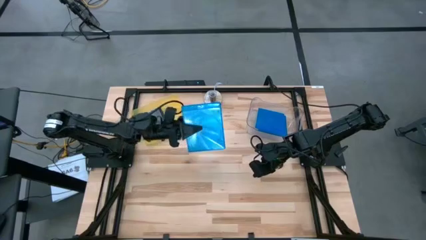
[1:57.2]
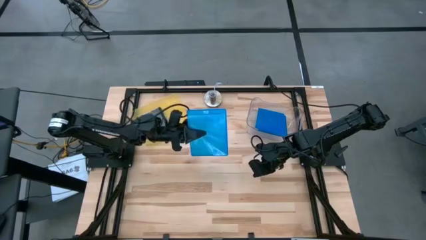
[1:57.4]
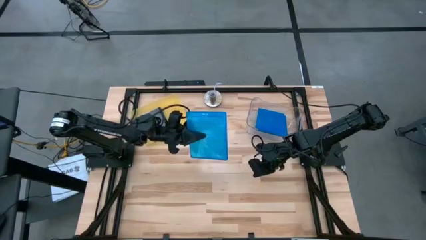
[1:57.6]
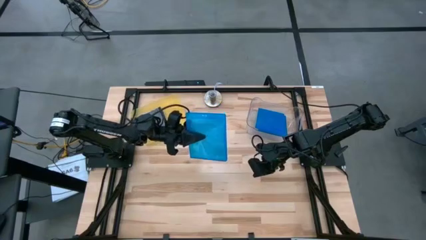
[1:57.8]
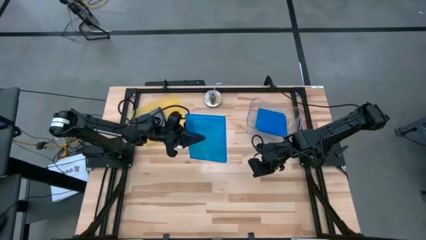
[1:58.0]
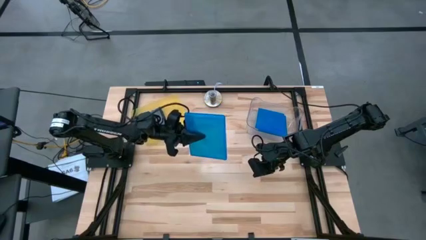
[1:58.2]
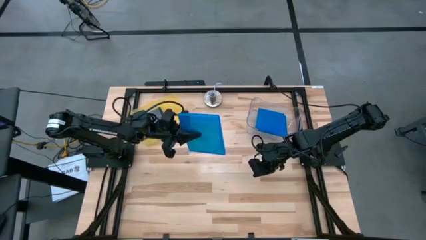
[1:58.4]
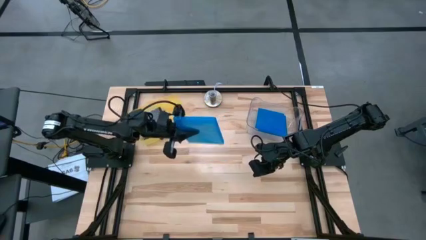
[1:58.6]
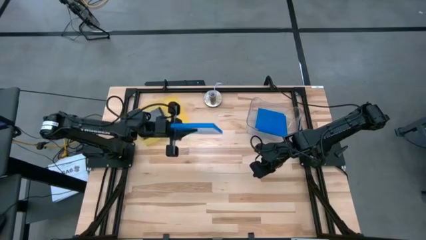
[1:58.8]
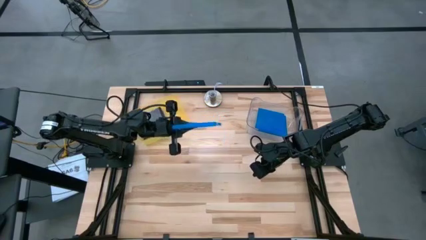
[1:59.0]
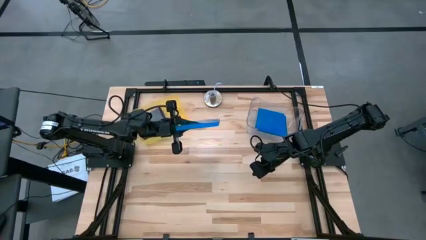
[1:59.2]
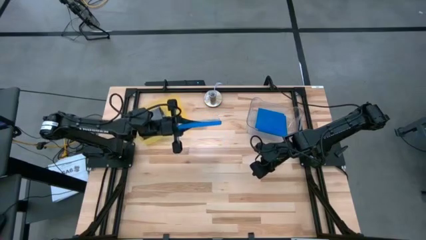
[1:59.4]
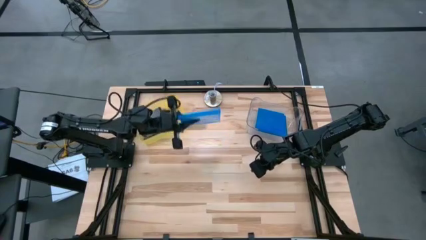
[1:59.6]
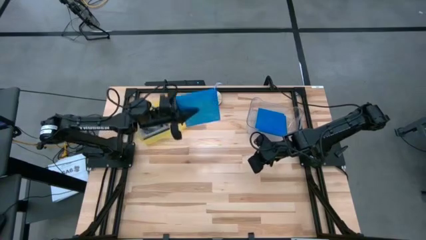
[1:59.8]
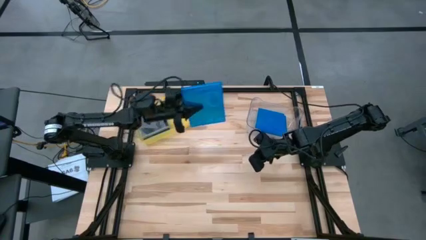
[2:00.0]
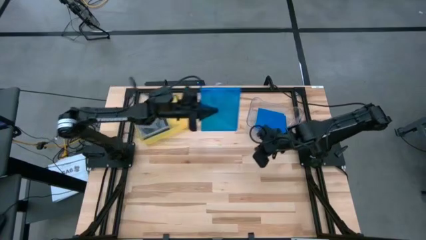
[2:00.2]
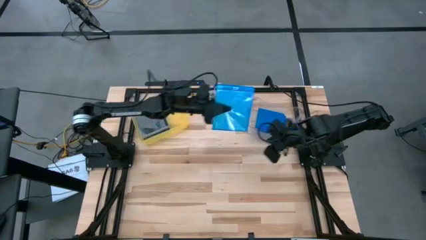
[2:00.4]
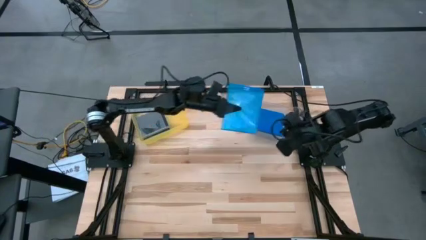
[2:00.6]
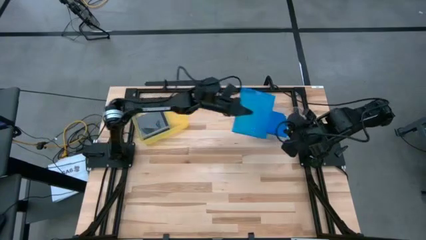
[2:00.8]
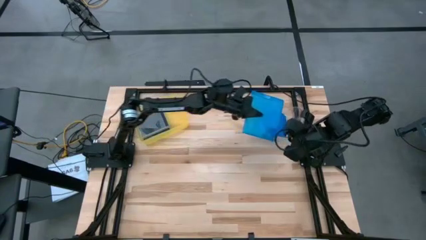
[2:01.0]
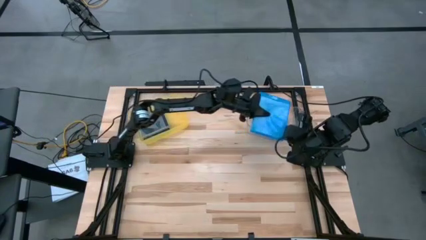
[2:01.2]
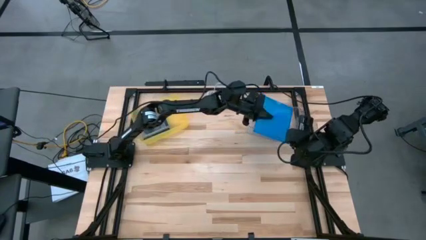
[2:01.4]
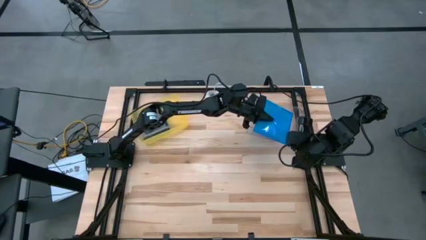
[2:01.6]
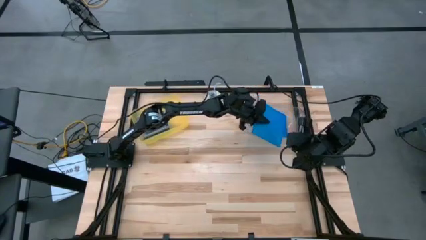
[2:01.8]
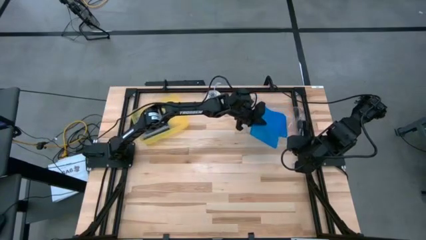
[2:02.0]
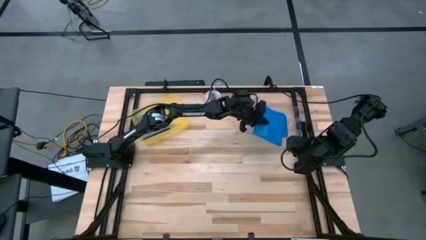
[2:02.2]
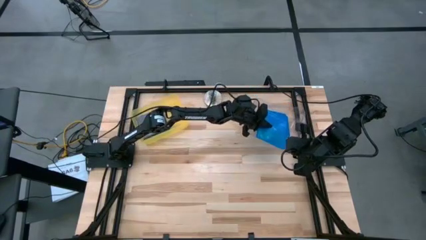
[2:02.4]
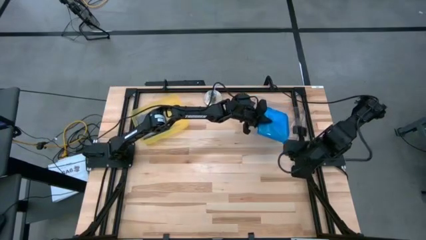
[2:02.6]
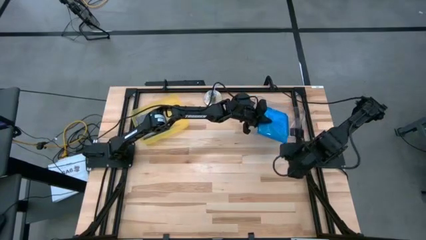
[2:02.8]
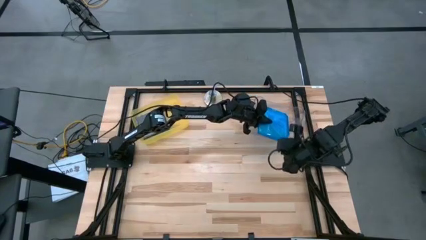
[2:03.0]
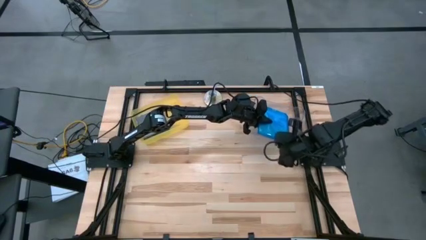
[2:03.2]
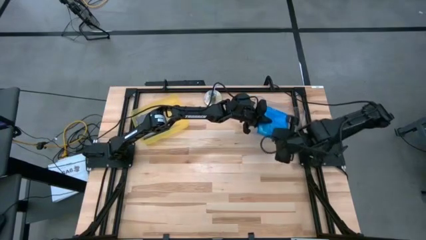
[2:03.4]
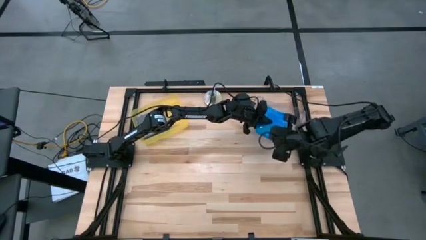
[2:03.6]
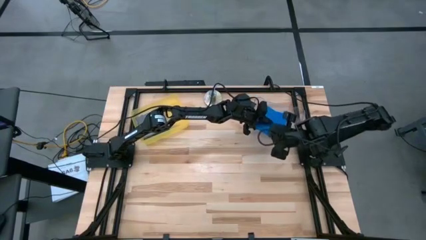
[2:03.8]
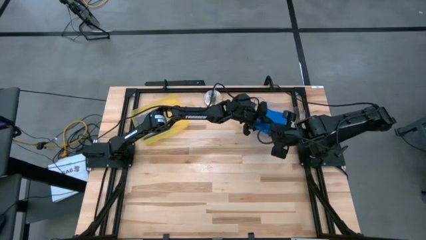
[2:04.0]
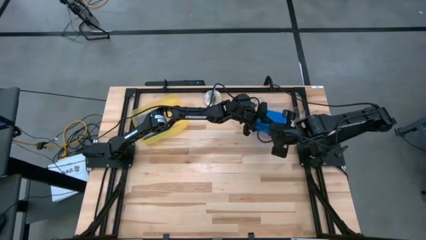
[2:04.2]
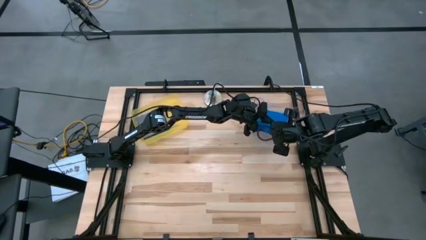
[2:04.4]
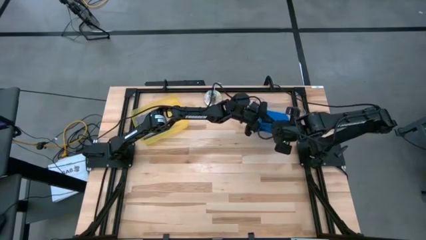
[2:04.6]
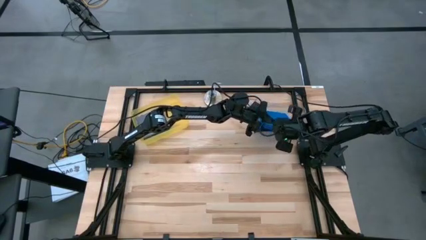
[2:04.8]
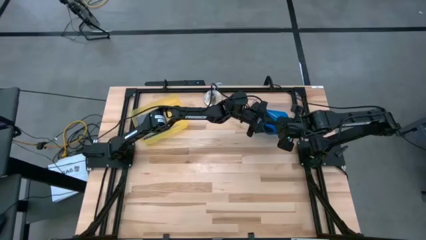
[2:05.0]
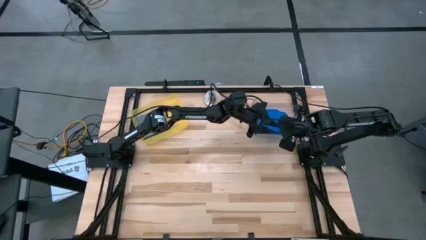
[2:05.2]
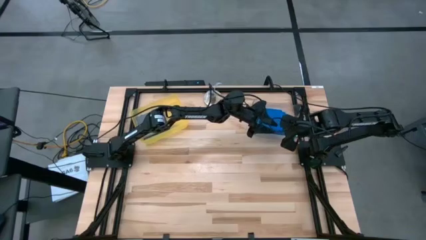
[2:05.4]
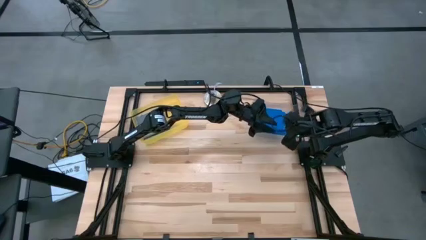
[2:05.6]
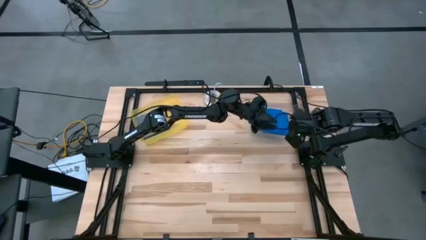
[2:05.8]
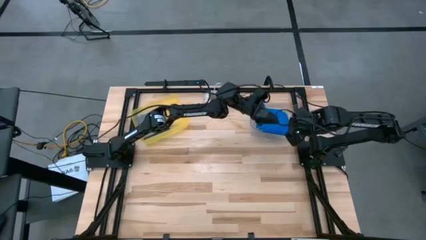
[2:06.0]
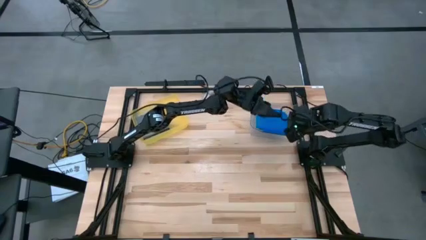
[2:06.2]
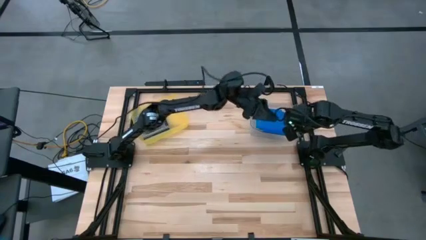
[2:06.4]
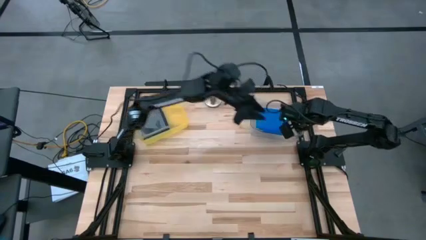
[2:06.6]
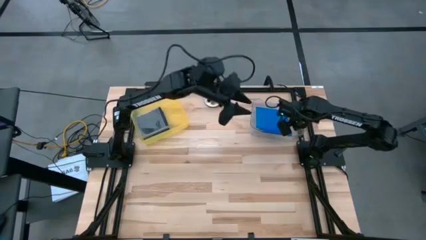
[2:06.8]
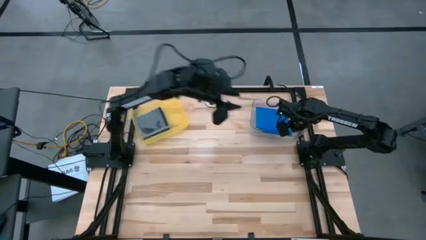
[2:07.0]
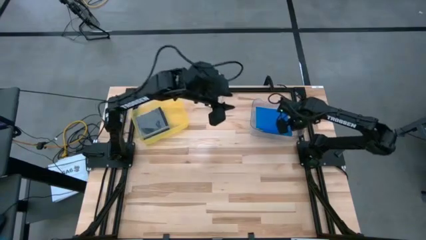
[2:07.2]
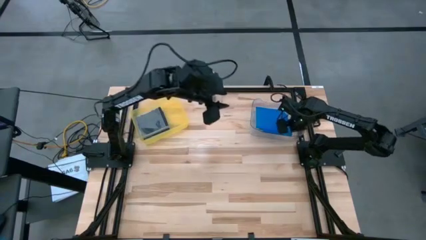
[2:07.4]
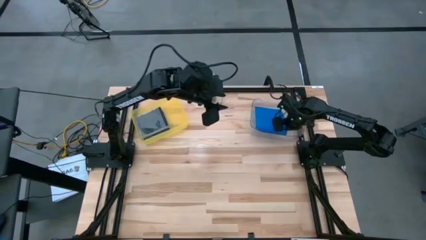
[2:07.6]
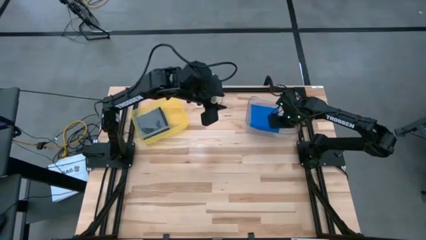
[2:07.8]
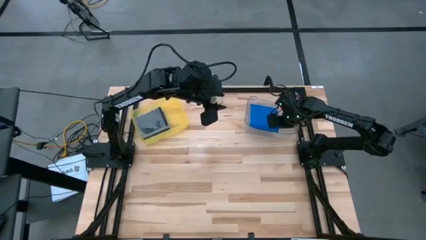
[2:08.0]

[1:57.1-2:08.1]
Task: Pick & place jewel cases by type
Put the blue CD case into the transparent bin

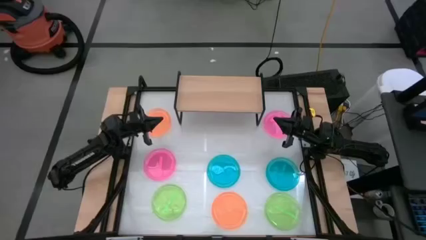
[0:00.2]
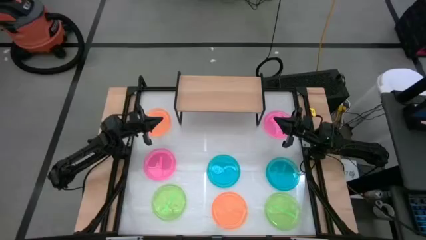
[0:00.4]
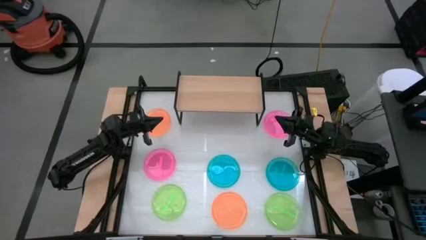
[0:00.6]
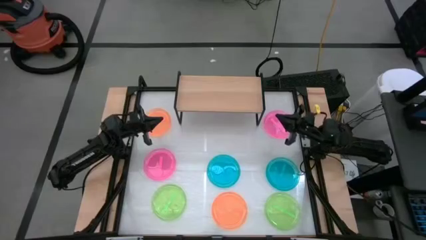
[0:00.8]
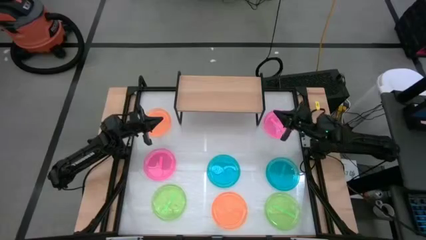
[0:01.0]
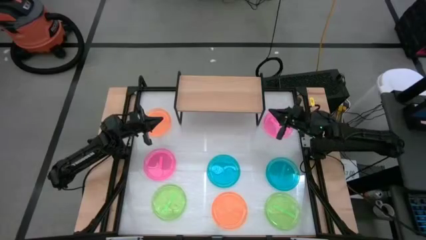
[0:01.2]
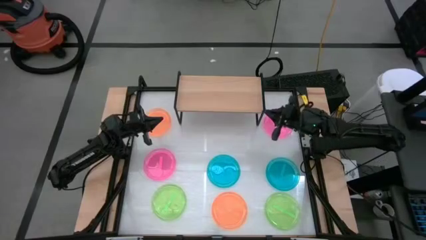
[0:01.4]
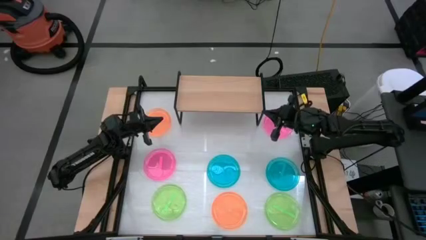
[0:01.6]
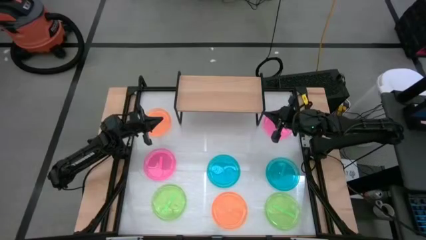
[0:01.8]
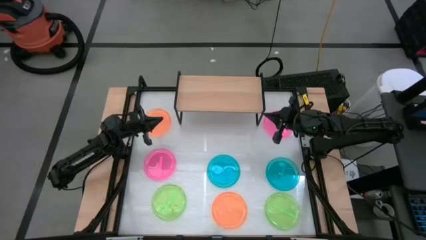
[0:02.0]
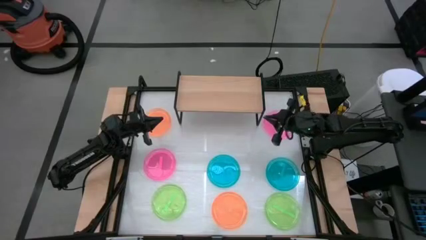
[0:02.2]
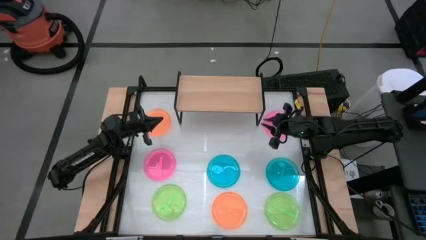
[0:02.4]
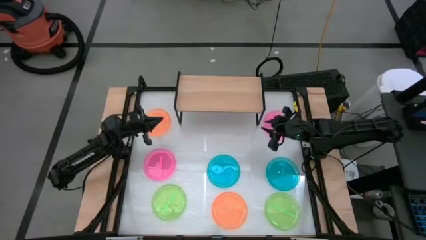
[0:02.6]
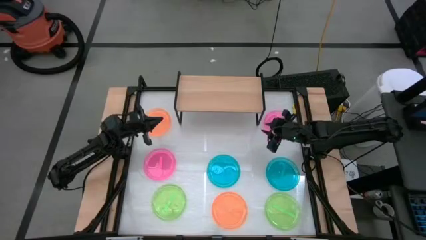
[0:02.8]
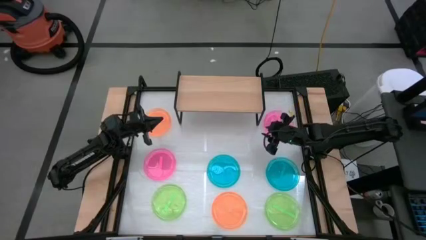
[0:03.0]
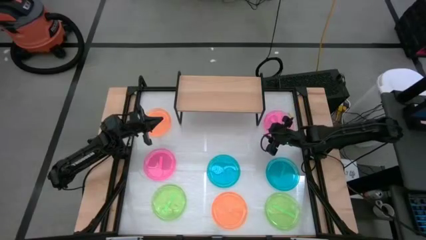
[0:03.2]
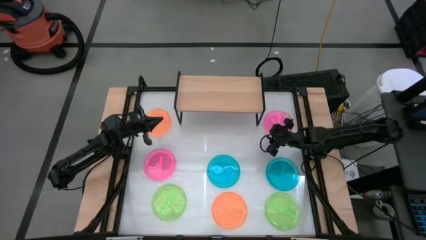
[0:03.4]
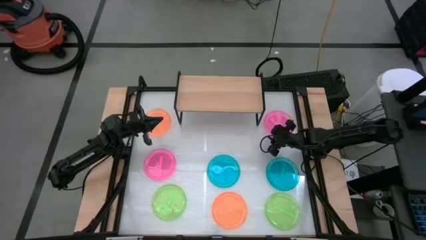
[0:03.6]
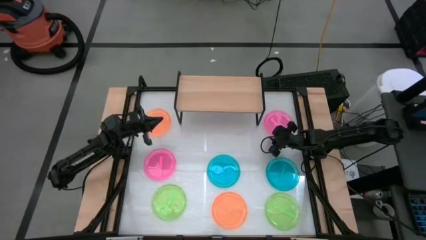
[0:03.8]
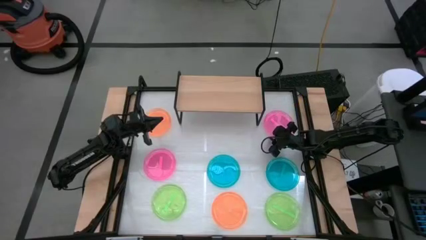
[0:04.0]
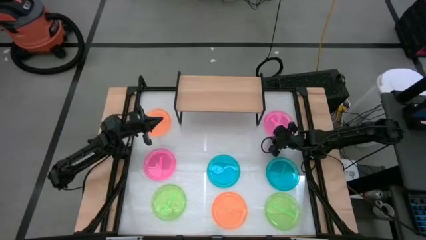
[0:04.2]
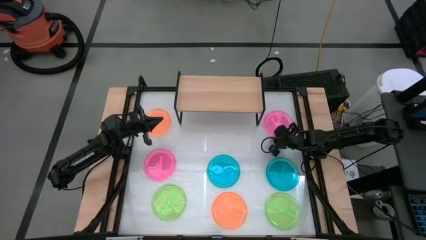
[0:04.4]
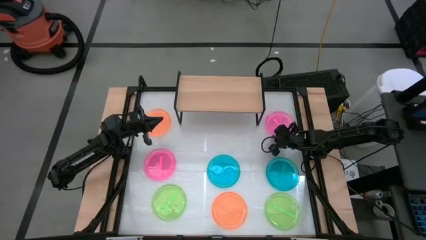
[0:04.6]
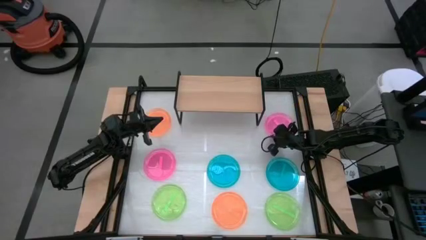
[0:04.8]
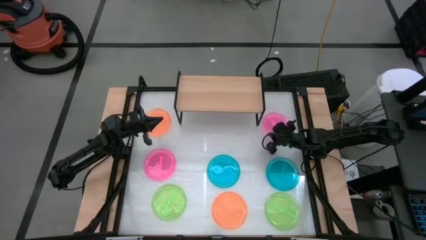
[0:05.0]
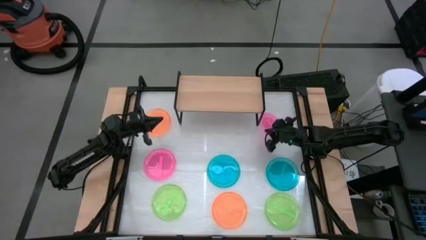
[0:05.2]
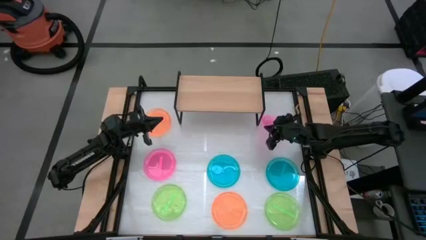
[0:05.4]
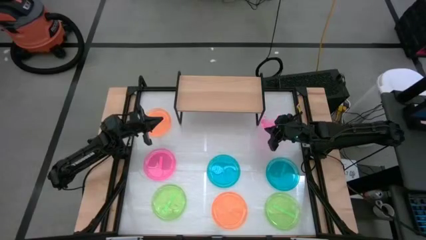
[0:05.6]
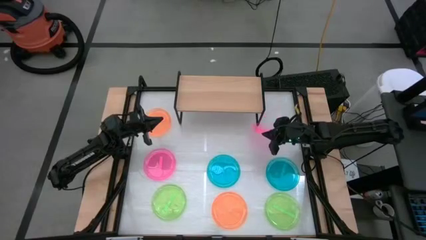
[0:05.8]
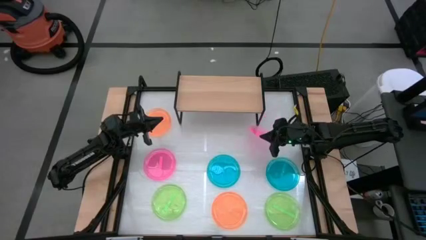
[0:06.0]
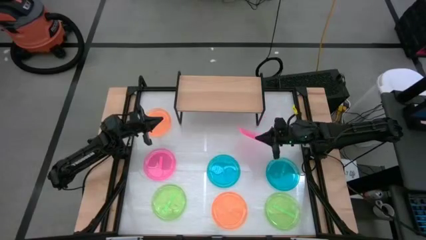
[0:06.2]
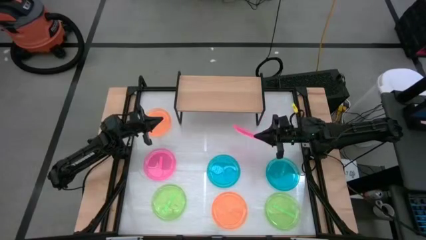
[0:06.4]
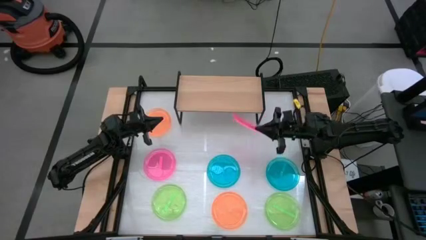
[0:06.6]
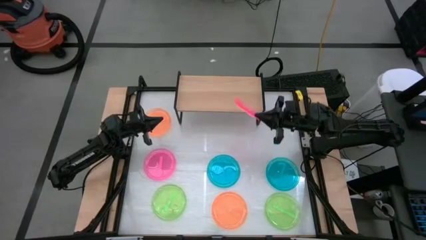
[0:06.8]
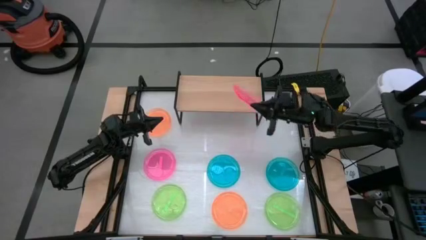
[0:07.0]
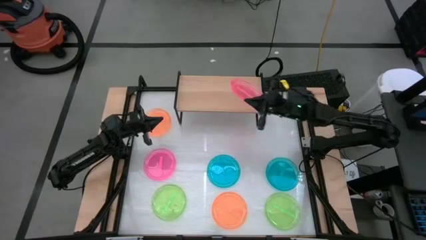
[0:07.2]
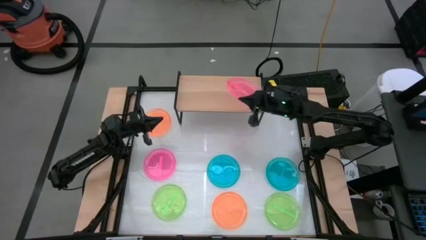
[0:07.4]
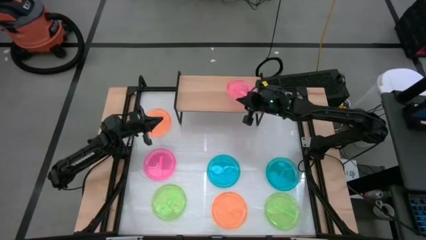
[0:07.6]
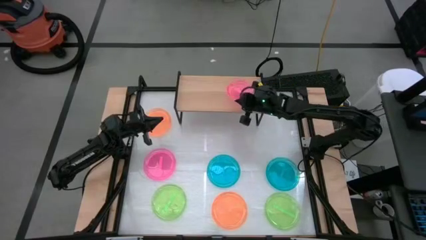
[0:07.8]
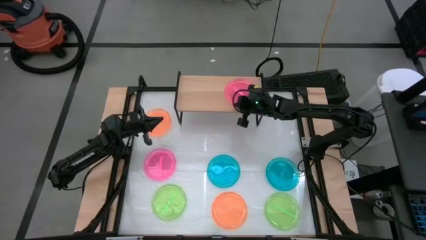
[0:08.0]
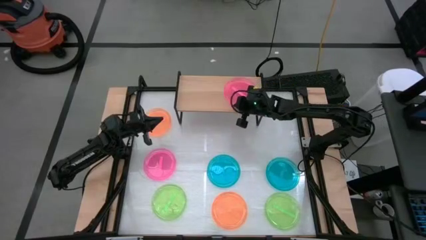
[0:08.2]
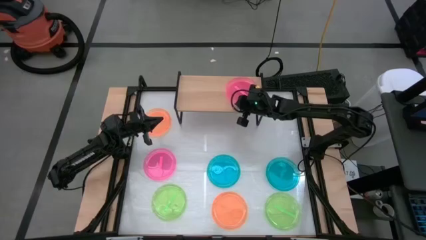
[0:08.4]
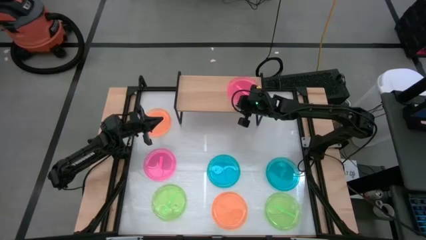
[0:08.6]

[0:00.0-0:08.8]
Task: Place and stack plates onto a shelf
Put the top pink plate on the shelf
